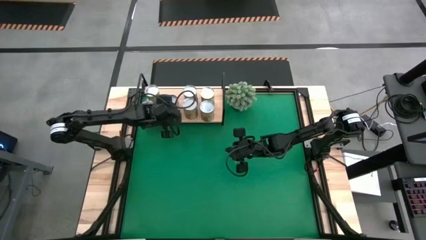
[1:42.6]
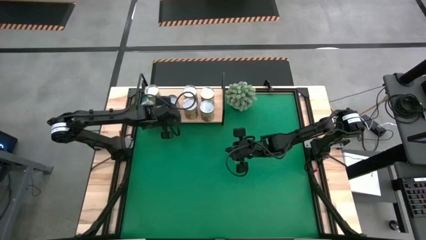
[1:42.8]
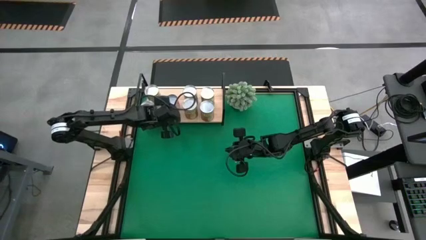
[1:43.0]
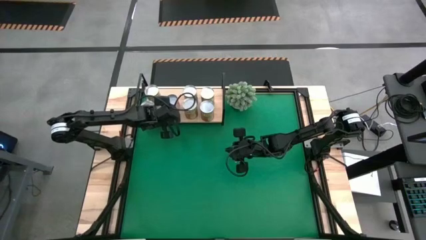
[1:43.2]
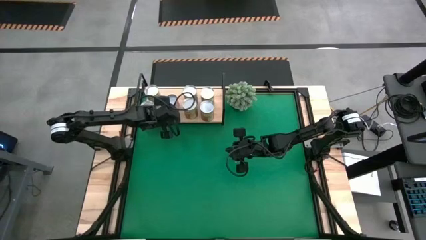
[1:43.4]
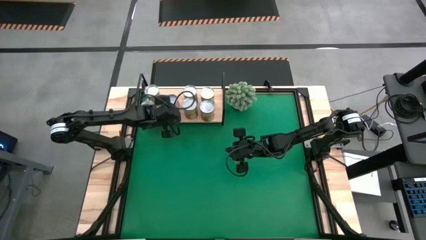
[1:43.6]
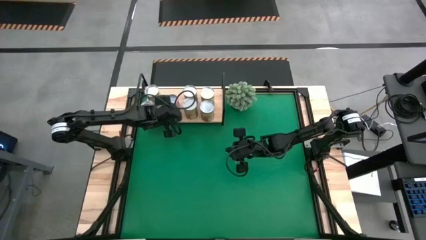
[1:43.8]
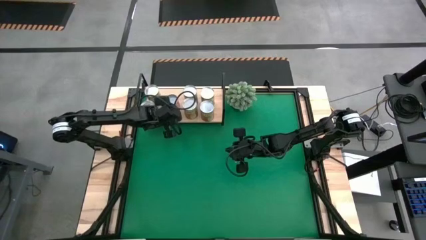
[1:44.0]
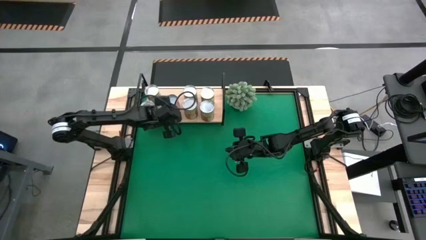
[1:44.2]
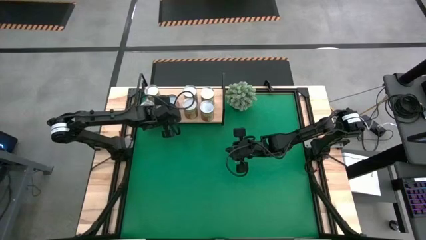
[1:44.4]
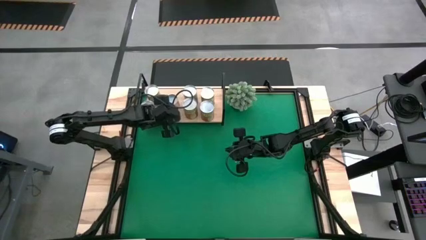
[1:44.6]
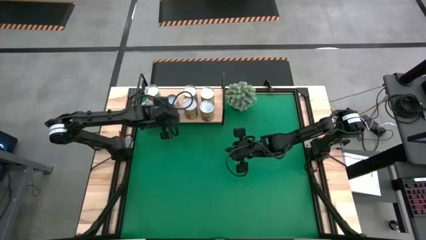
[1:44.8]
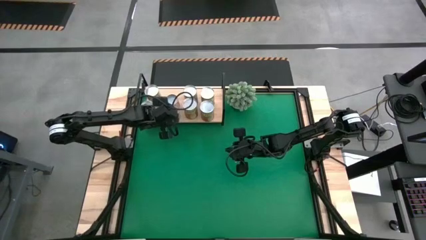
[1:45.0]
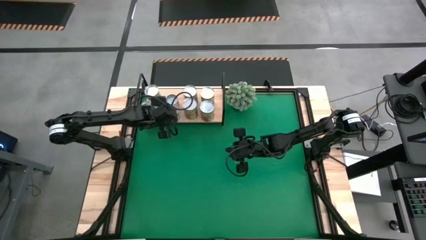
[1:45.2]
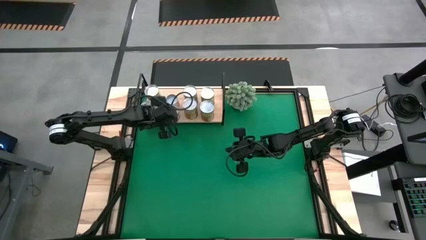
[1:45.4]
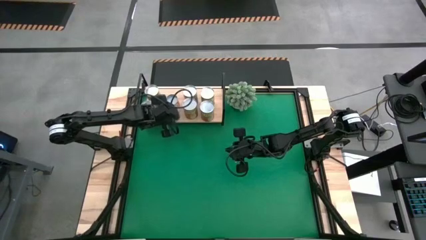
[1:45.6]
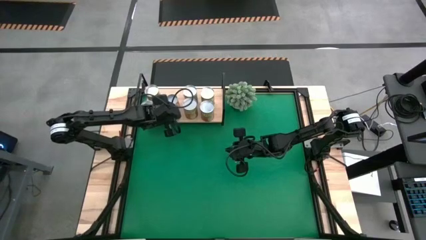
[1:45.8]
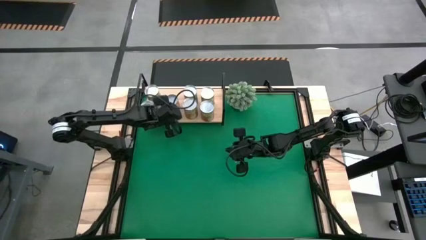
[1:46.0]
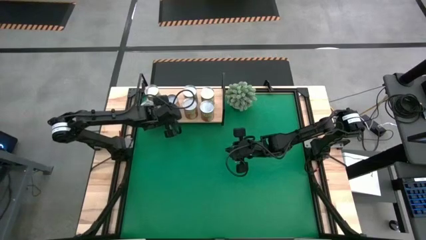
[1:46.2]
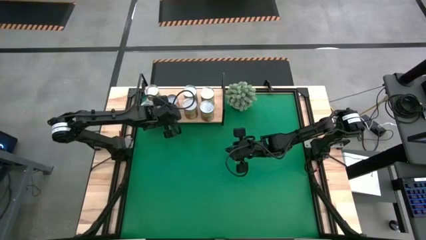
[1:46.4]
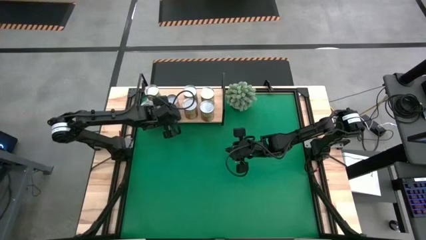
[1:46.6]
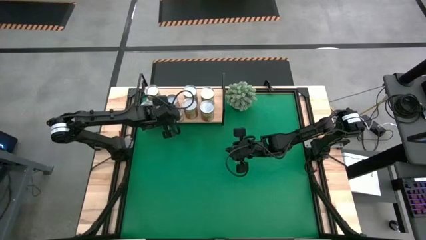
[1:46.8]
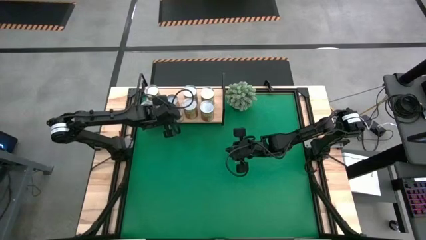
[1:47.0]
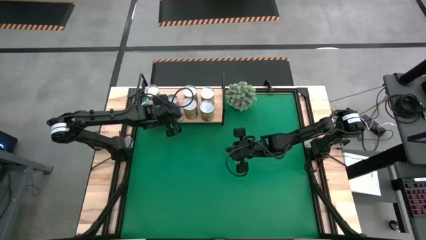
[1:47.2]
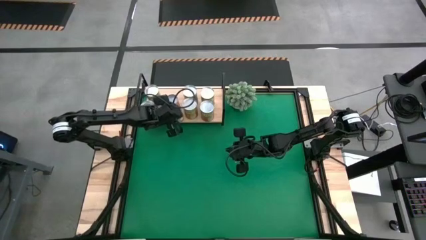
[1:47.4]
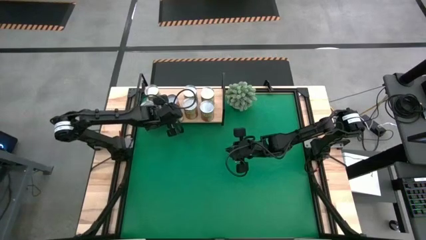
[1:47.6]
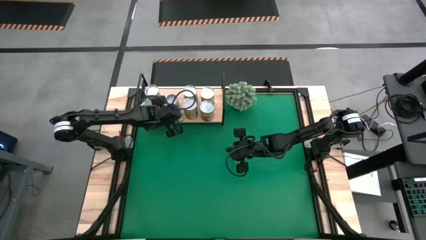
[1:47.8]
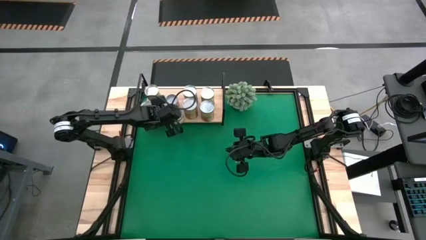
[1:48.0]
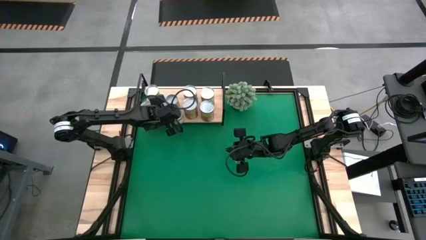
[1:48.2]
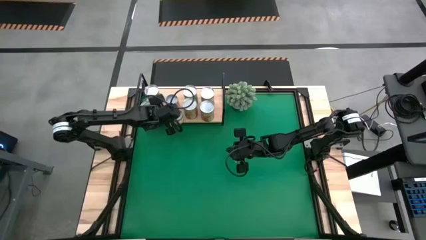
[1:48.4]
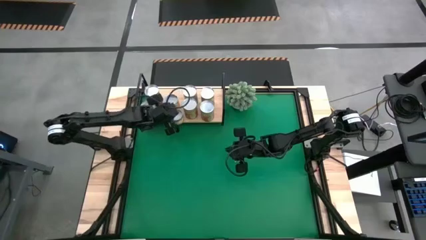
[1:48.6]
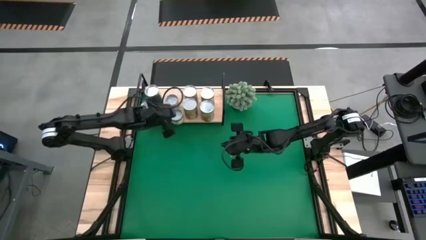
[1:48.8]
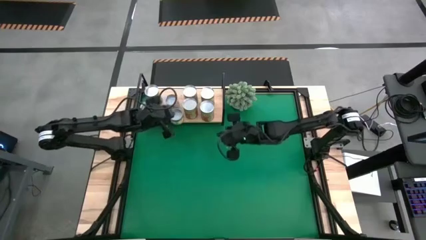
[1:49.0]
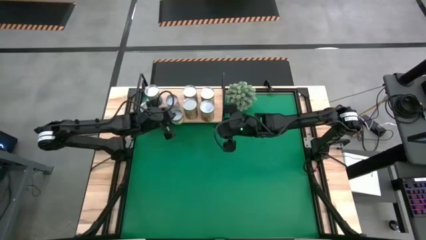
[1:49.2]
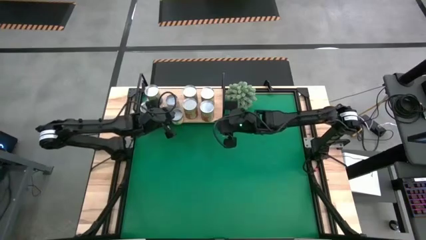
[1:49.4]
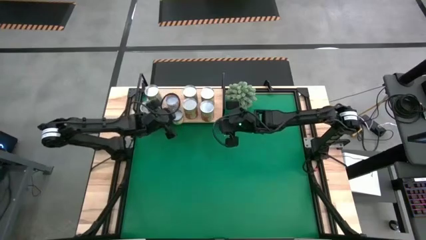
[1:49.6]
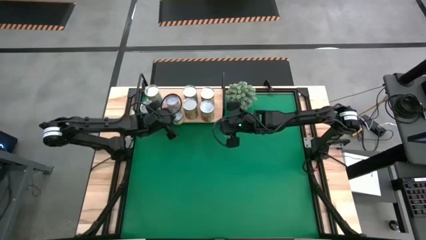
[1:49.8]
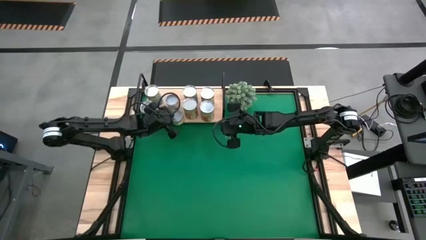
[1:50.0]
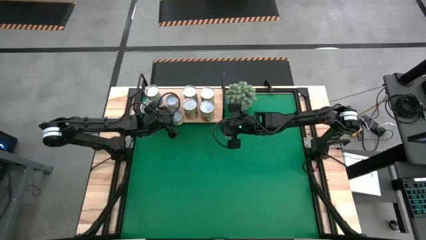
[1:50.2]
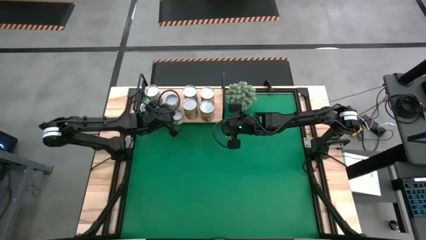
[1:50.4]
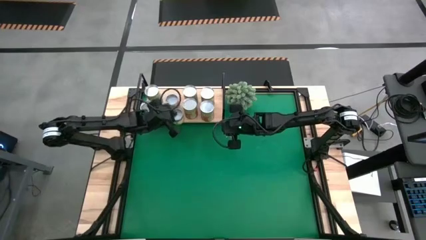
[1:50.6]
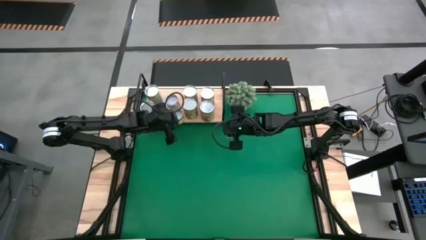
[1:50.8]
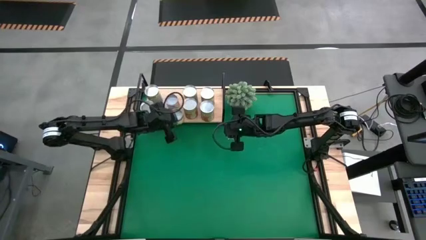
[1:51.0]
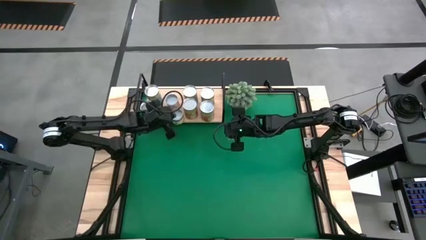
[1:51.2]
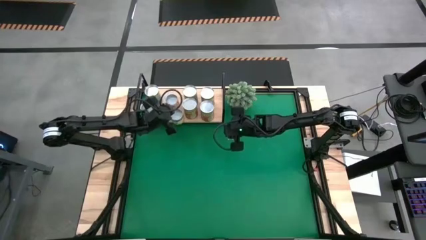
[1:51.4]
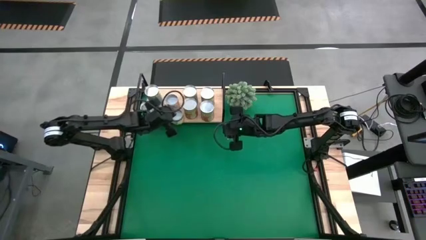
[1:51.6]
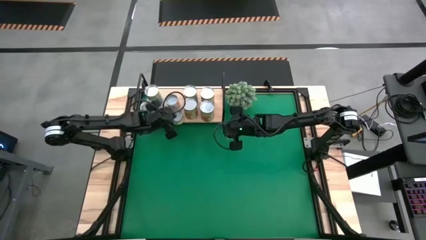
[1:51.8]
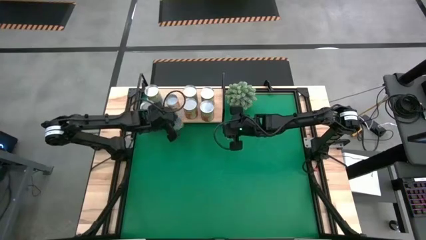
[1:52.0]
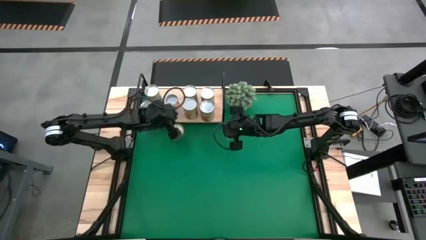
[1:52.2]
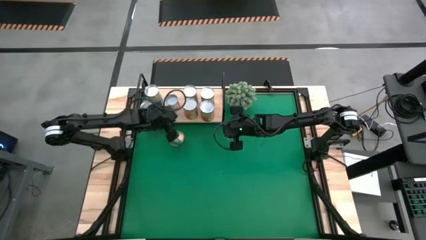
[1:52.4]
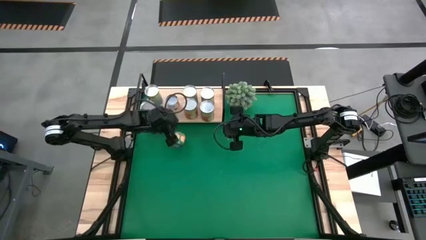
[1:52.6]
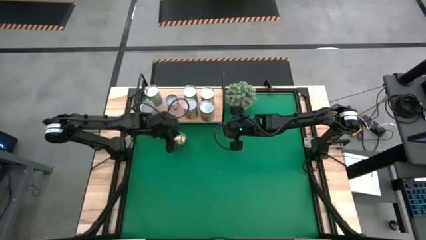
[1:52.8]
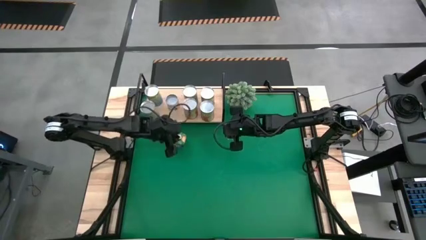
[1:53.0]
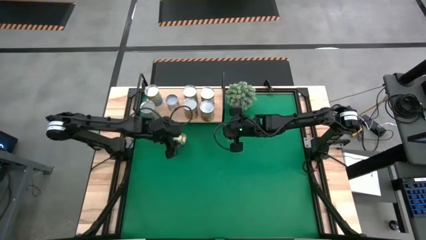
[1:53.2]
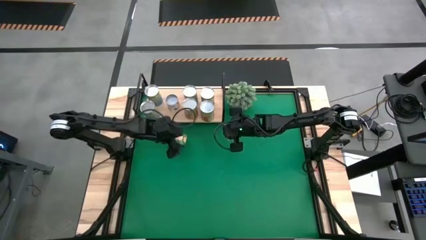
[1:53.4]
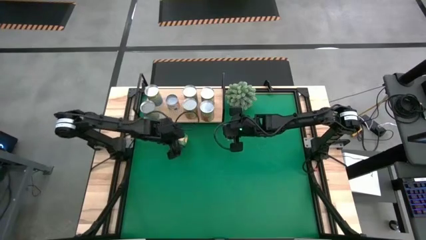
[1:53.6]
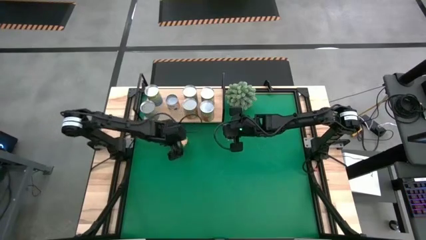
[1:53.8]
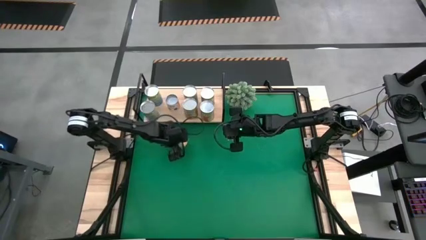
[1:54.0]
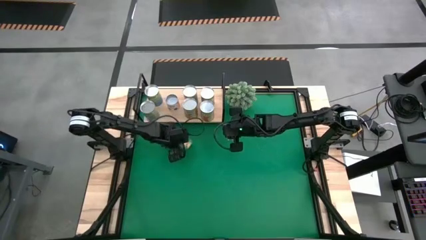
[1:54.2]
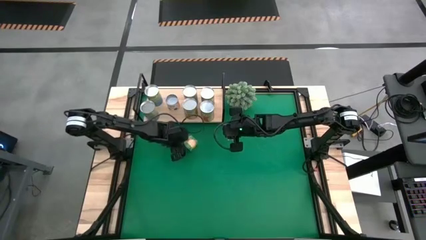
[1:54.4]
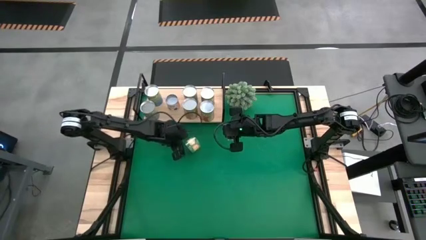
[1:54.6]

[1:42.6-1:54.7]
Task: Pick and place cans onto a shelf
Put the canned sliced peaches on the shelf
